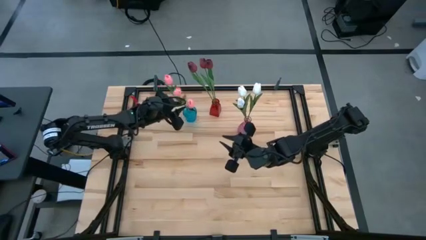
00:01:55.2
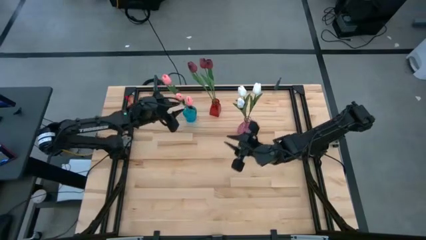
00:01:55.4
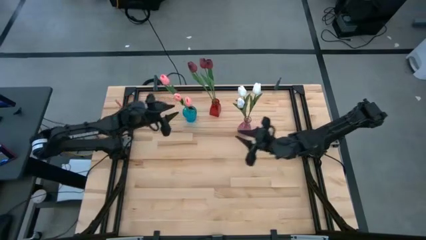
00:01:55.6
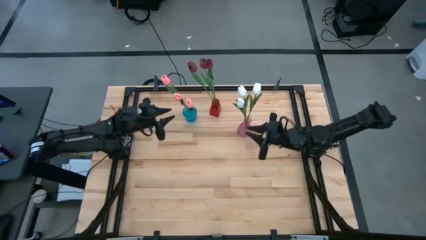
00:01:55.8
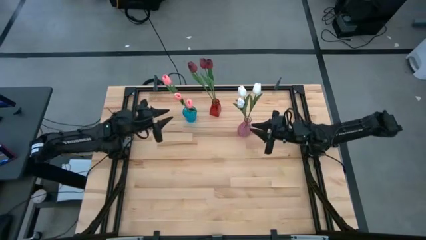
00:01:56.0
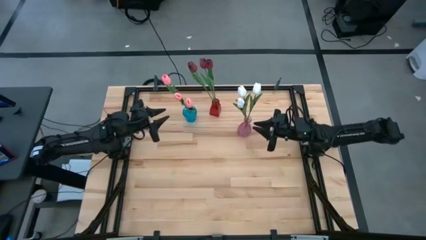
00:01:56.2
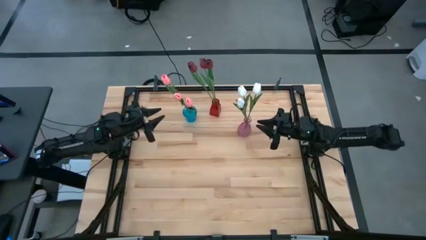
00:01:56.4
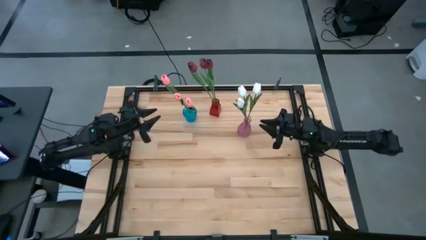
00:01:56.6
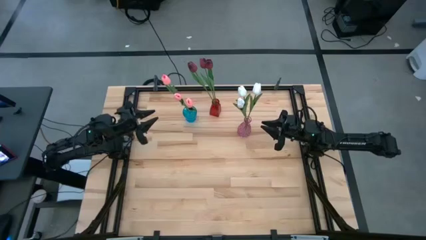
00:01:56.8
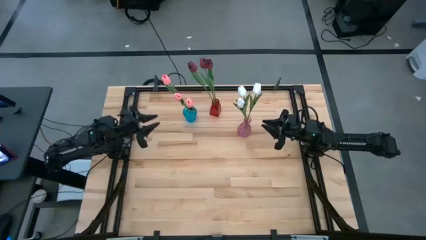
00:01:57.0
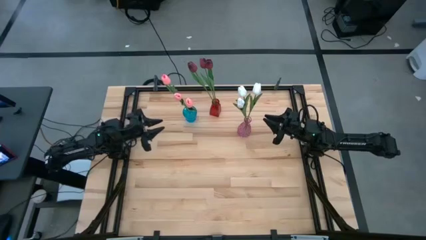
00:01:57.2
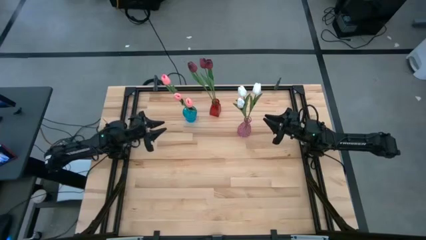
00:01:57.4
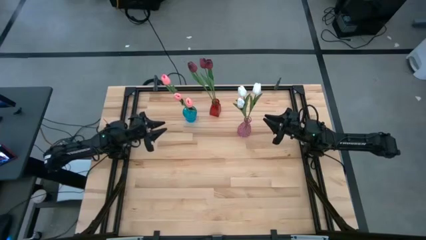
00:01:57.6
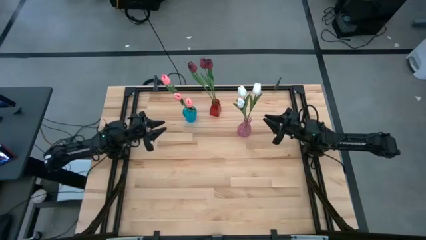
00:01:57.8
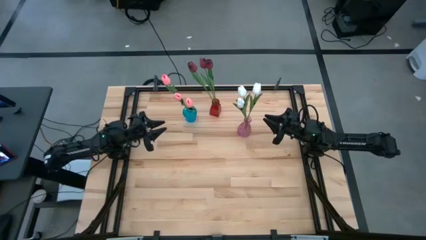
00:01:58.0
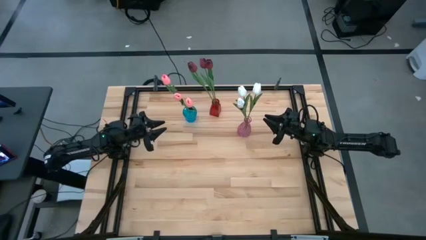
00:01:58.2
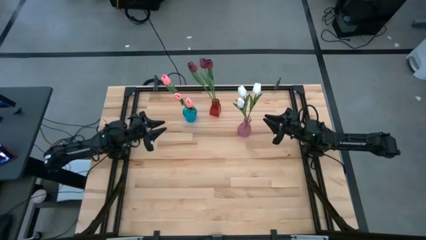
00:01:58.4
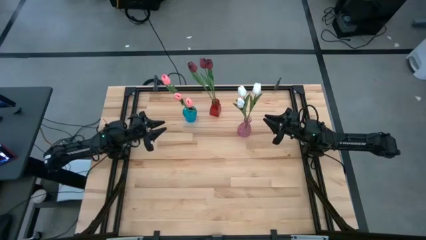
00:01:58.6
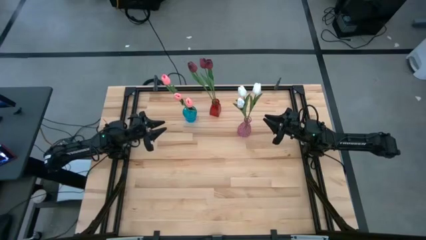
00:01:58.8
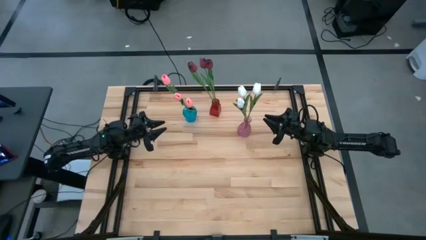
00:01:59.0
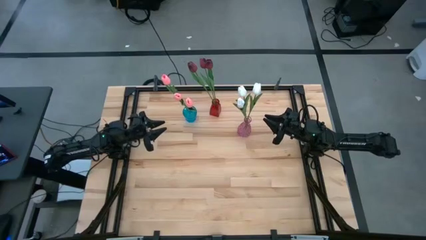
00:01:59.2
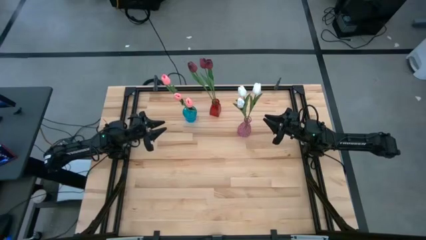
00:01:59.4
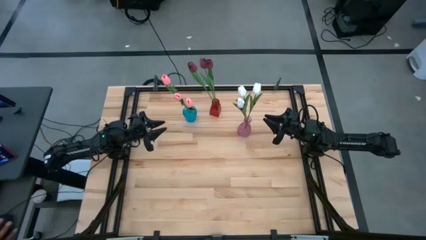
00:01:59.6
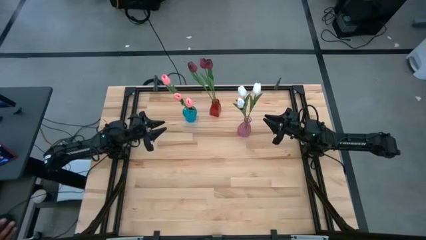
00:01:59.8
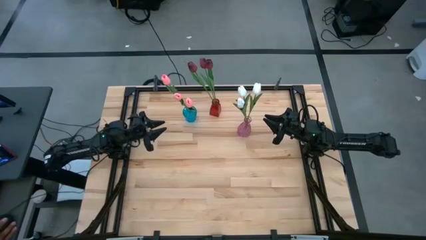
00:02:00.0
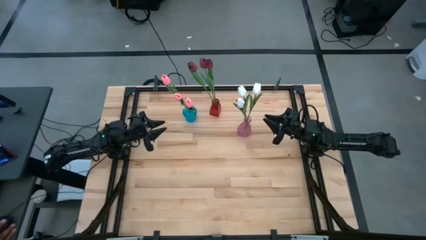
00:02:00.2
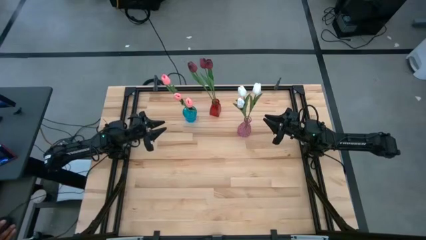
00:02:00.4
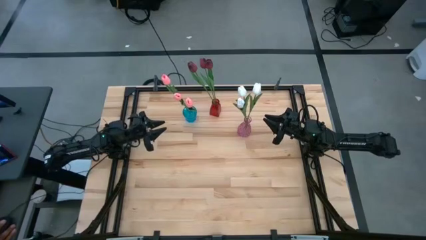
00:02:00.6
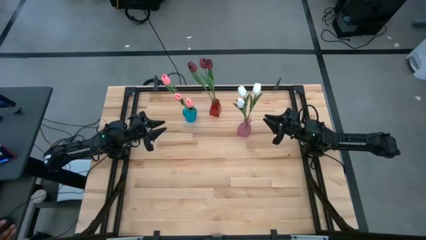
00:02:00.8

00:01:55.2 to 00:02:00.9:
Task: Sort flowers into vase by color
Return to Home Position

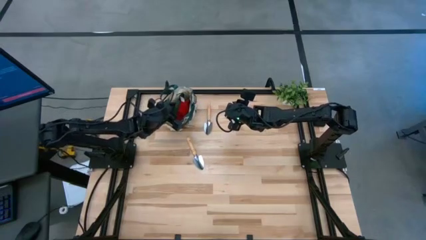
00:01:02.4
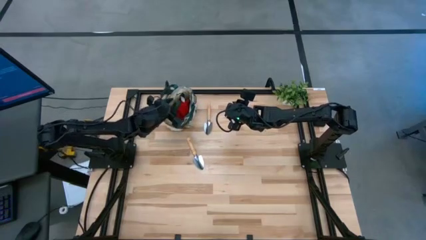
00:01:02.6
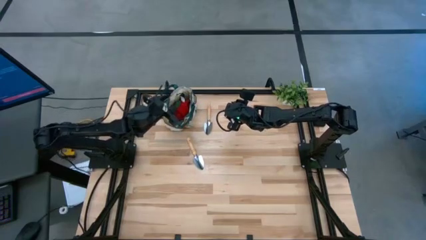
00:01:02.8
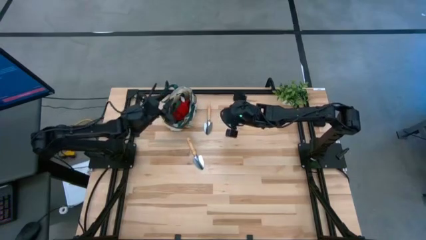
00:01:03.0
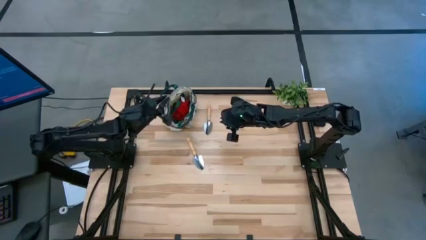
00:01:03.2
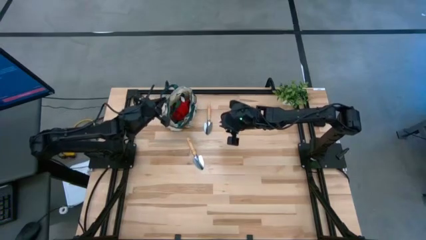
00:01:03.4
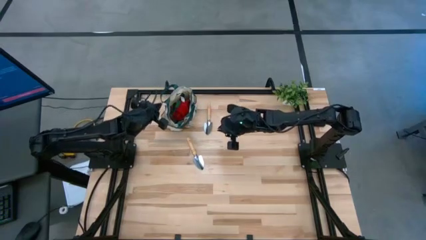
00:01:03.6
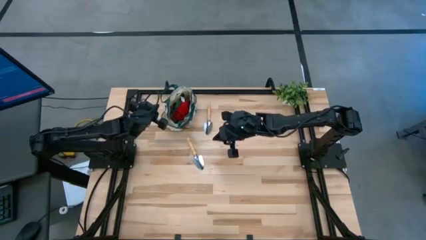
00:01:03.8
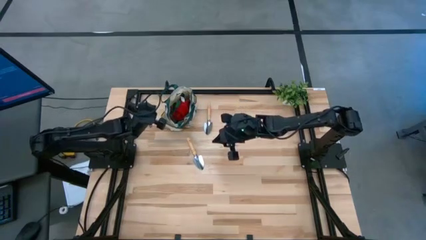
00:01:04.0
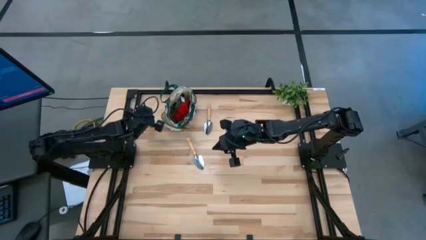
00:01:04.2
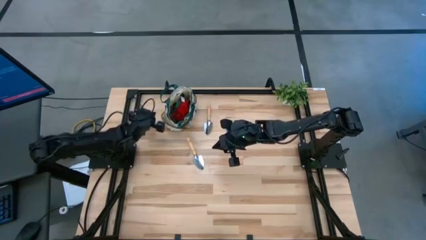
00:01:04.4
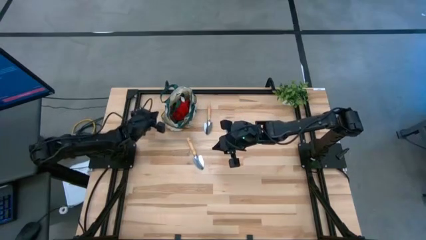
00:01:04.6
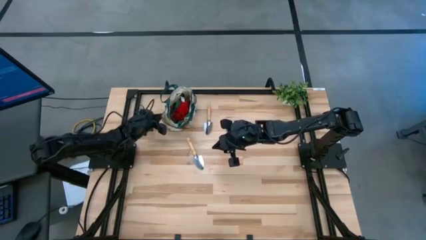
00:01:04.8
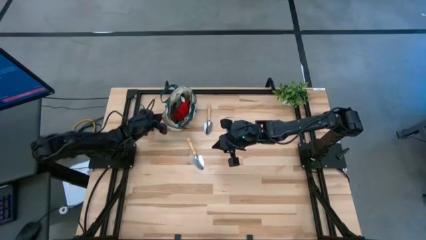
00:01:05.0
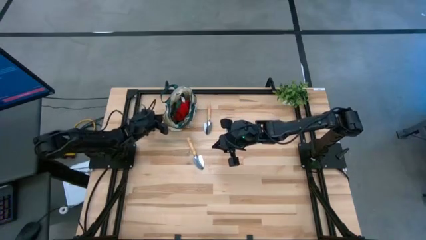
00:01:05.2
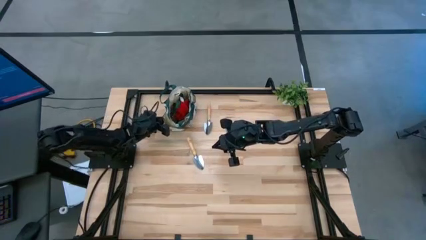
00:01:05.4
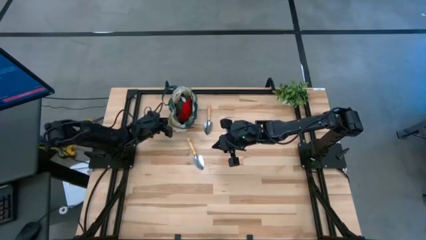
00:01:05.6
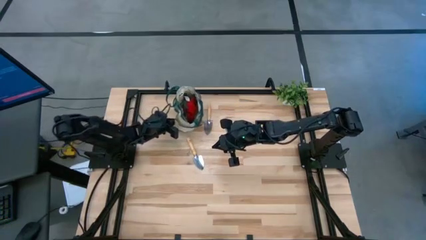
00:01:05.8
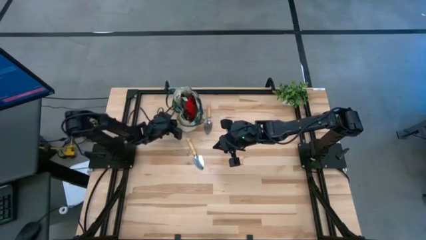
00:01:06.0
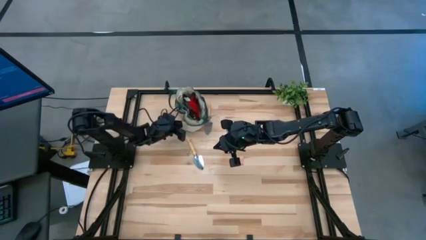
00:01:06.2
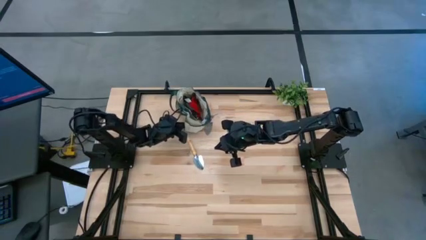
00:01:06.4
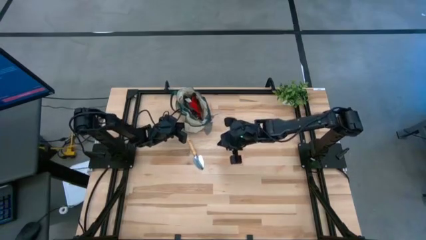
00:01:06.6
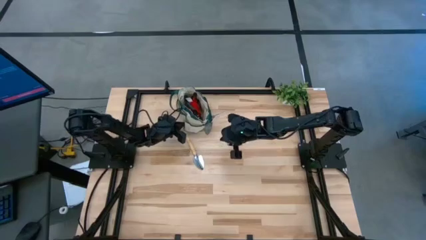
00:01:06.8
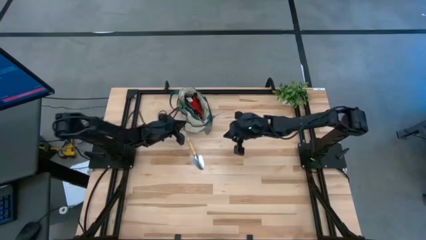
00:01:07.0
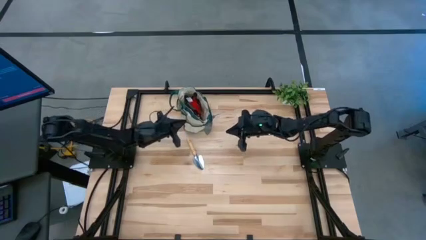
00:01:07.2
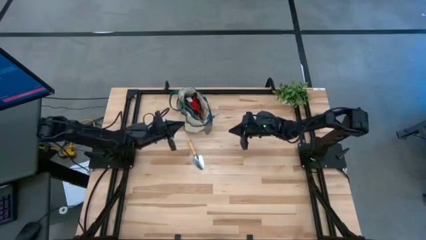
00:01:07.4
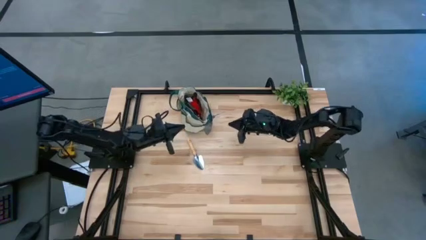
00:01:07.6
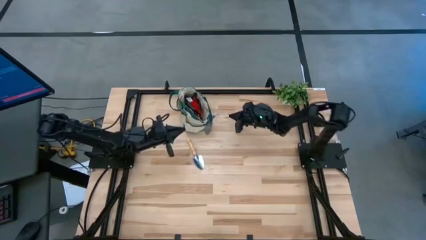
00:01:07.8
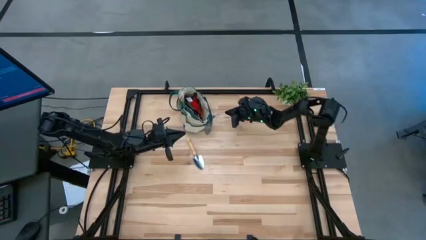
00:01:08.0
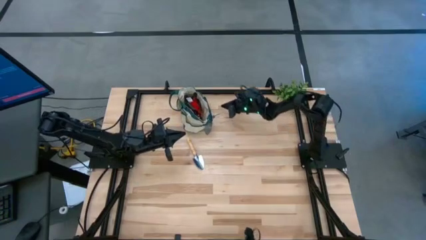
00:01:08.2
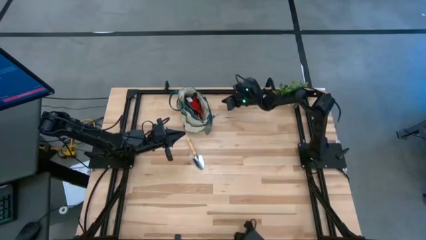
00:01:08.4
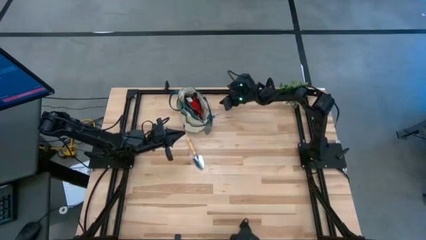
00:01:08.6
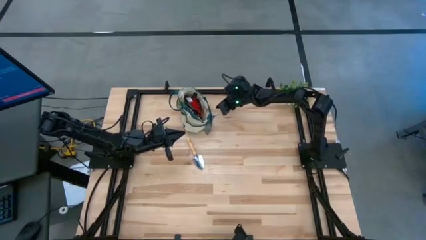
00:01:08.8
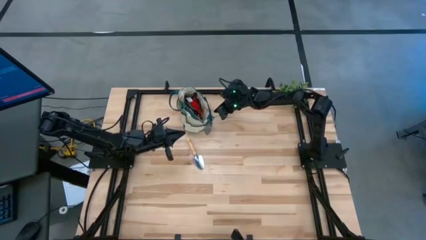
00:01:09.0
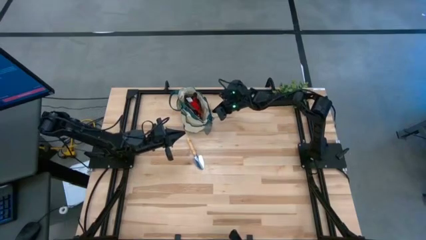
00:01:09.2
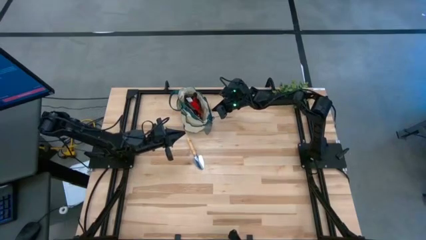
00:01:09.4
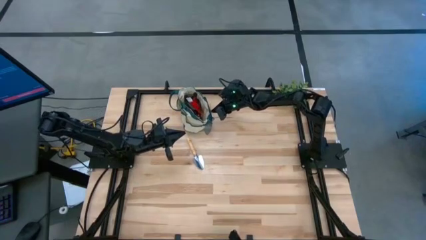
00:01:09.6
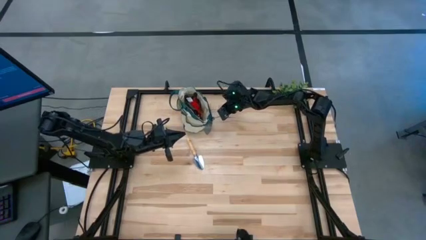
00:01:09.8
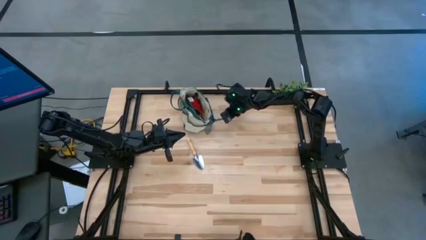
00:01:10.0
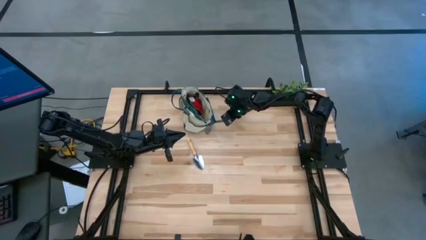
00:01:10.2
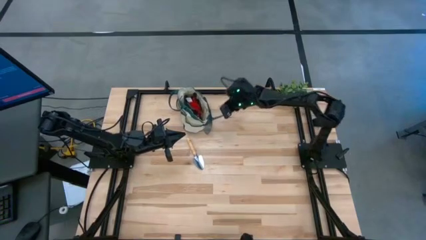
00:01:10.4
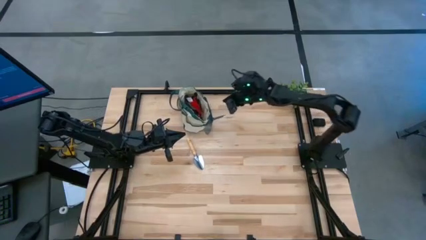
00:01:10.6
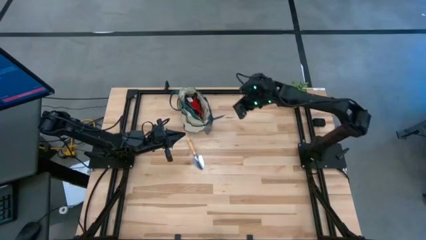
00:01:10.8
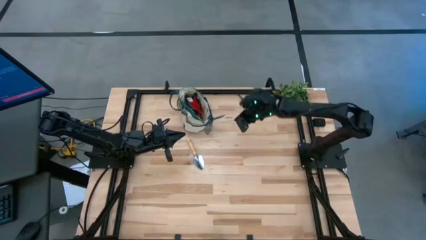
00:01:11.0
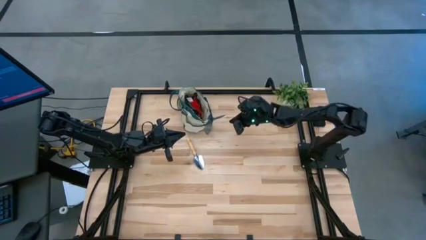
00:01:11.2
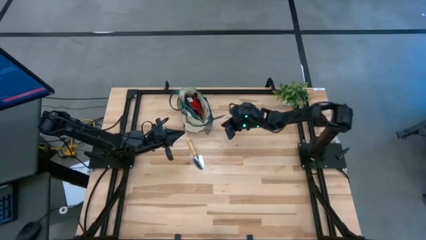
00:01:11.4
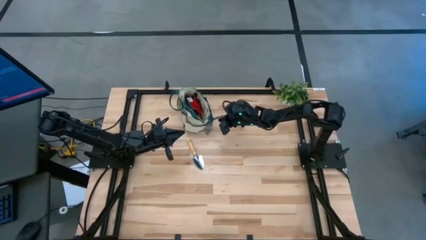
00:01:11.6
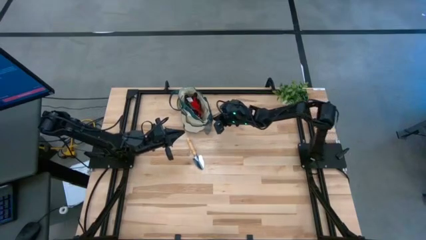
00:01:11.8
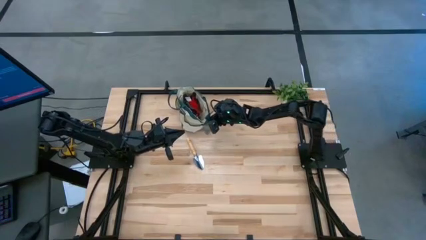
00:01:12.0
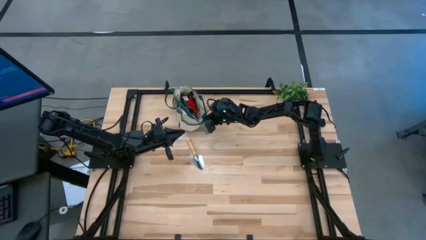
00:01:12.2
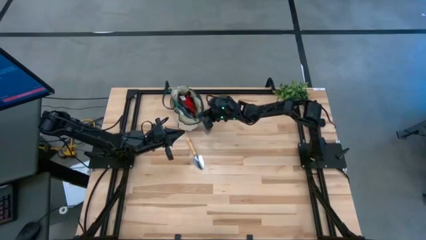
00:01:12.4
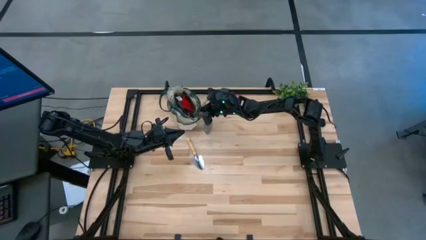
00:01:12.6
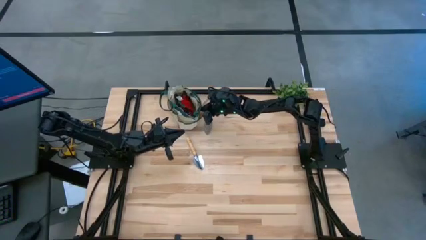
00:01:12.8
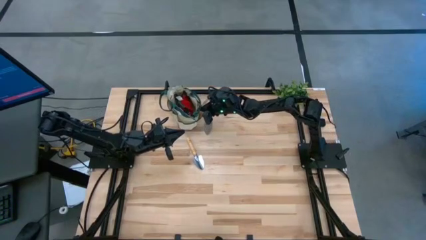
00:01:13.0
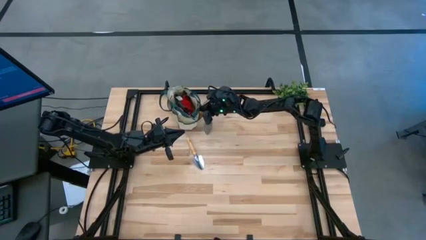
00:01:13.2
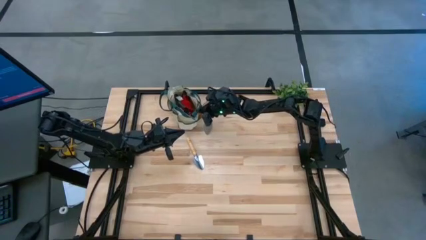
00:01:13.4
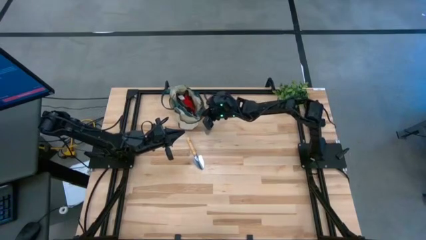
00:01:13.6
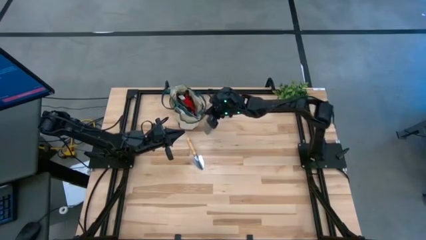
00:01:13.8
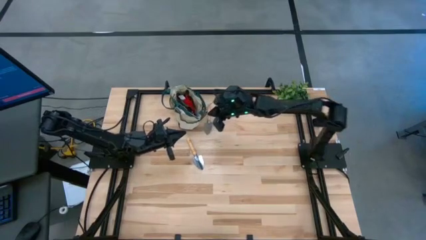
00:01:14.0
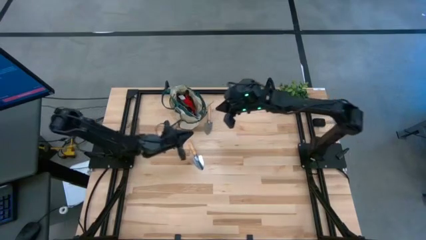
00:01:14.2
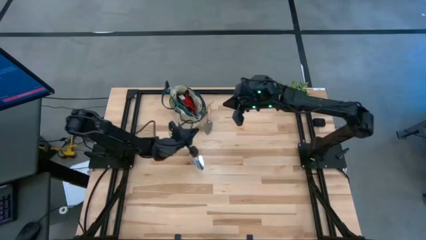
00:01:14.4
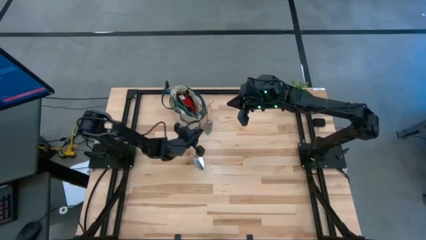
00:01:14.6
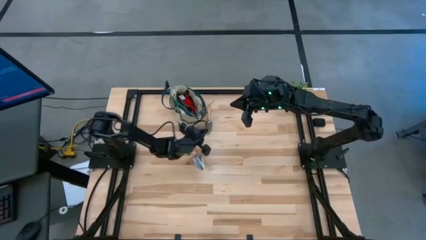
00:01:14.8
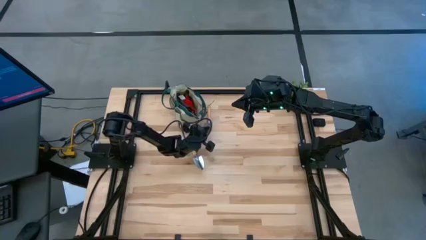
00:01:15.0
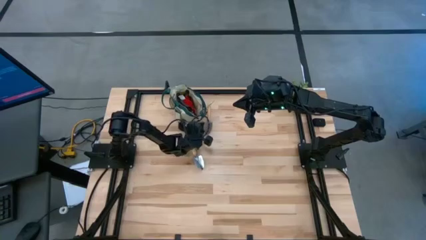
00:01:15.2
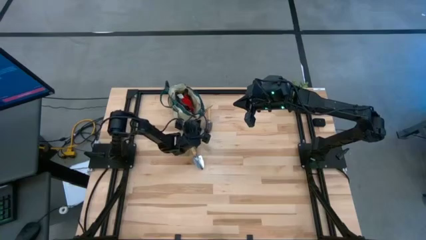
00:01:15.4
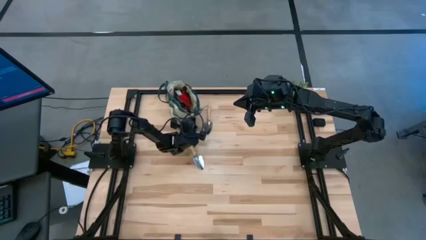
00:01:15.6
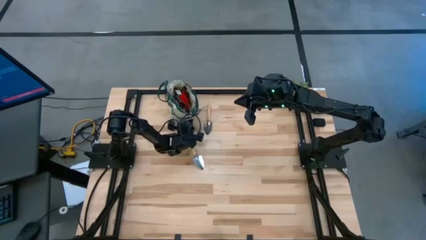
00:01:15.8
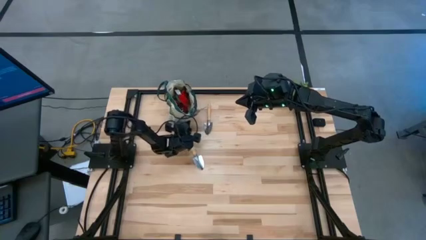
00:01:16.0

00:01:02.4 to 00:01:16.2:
Task: Pick & Place Garden tools in Gardening bag
Adjust the yellow gardening bag
